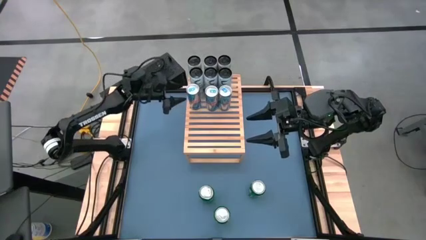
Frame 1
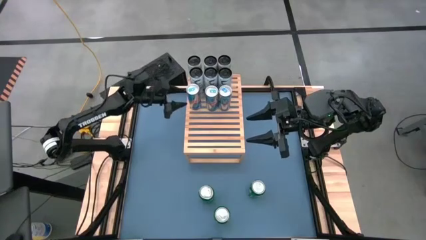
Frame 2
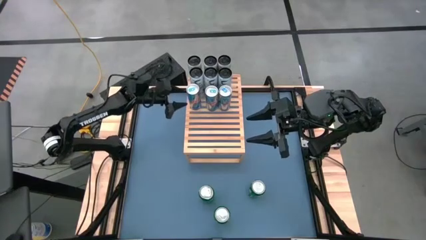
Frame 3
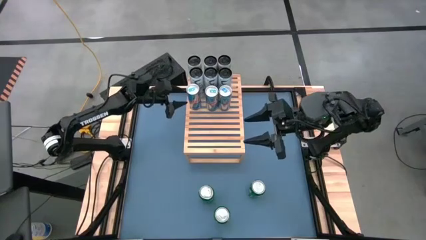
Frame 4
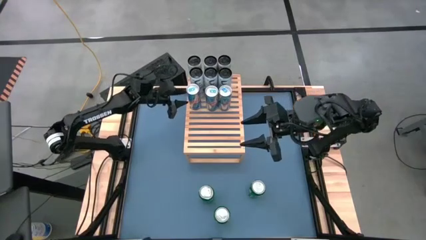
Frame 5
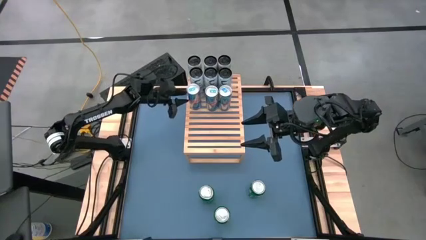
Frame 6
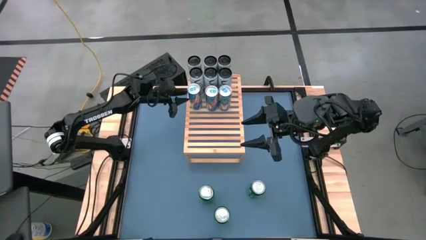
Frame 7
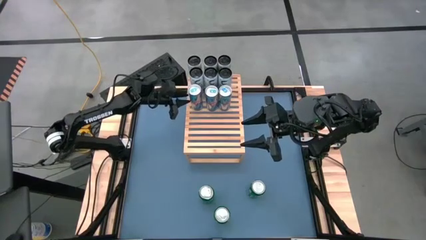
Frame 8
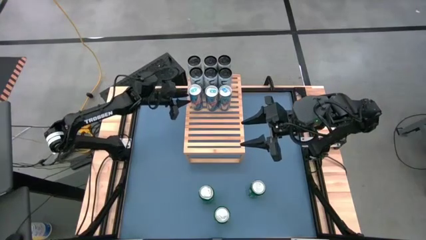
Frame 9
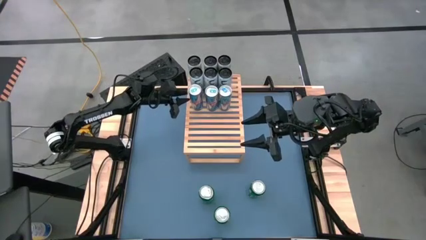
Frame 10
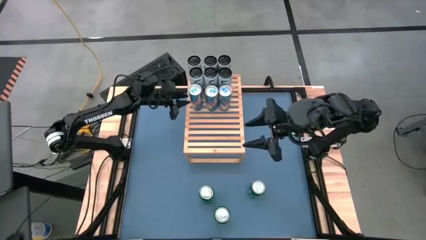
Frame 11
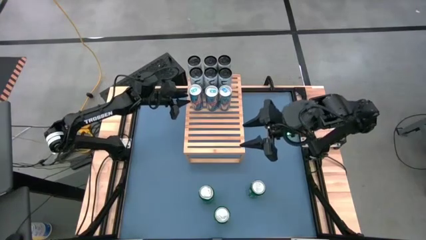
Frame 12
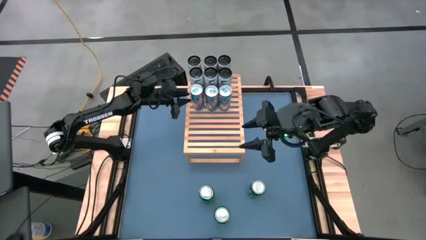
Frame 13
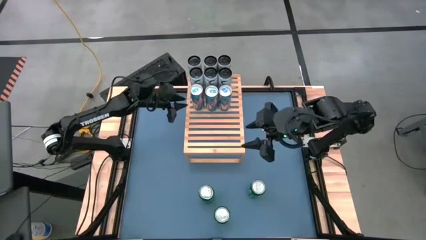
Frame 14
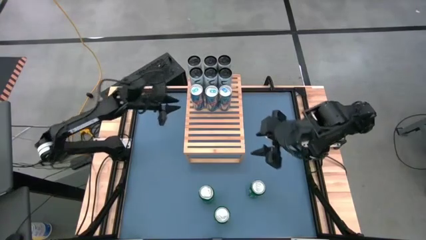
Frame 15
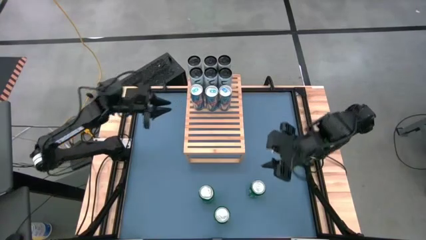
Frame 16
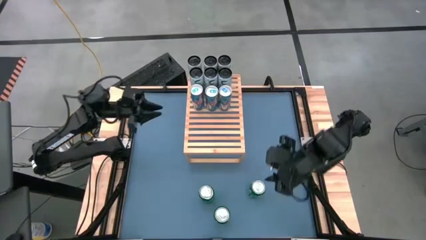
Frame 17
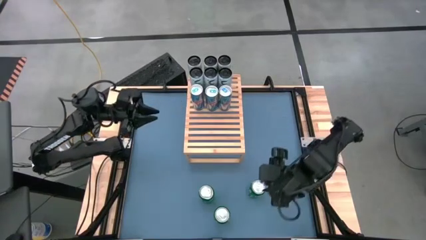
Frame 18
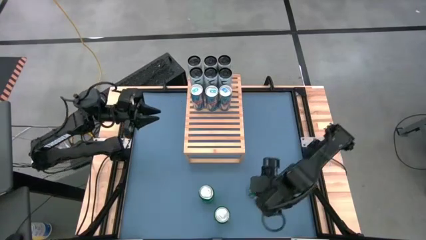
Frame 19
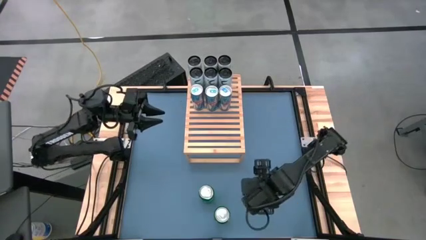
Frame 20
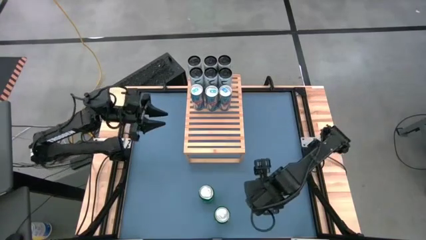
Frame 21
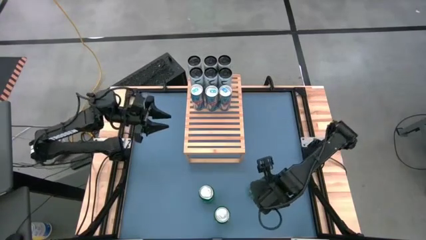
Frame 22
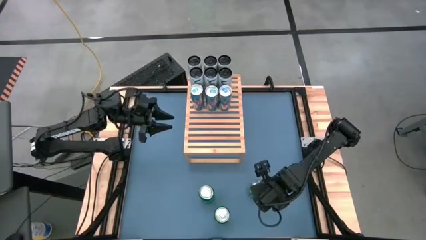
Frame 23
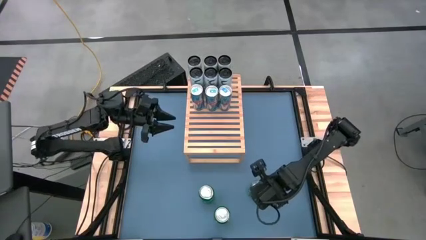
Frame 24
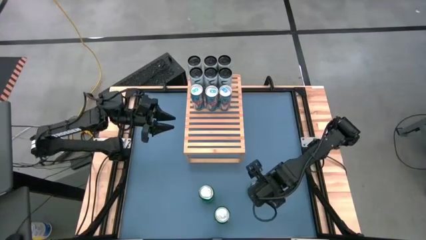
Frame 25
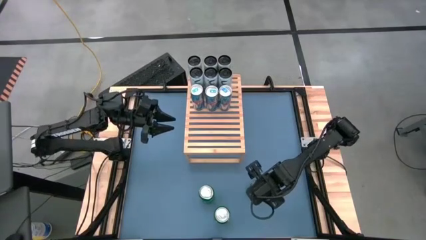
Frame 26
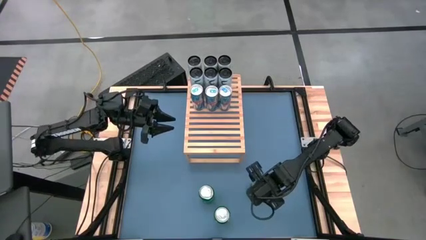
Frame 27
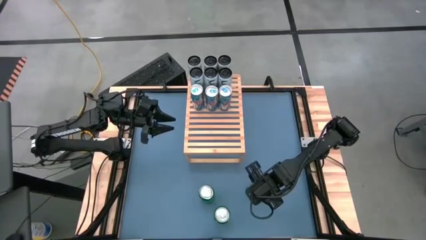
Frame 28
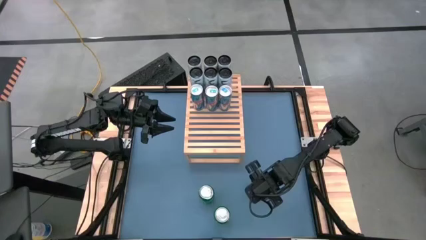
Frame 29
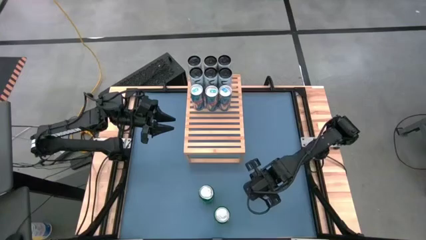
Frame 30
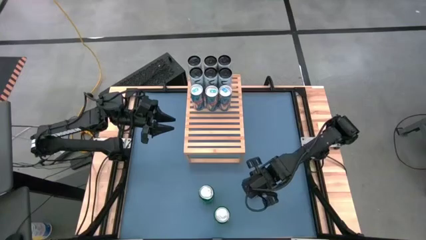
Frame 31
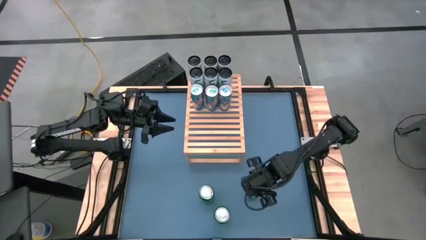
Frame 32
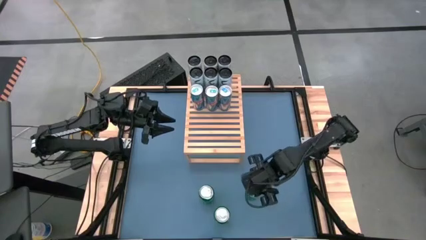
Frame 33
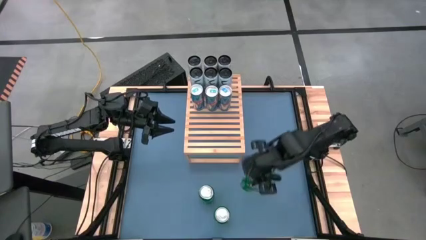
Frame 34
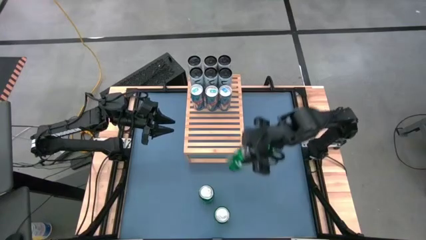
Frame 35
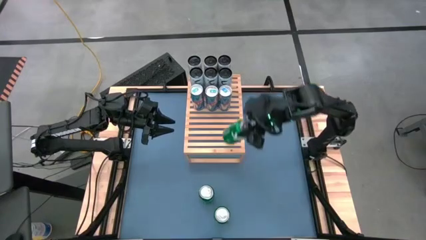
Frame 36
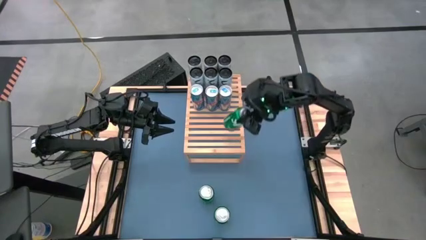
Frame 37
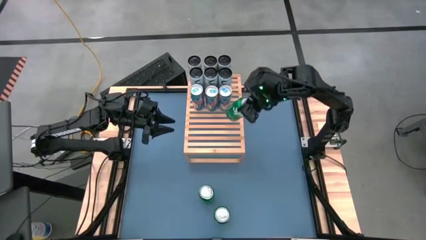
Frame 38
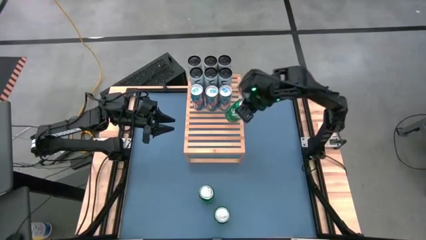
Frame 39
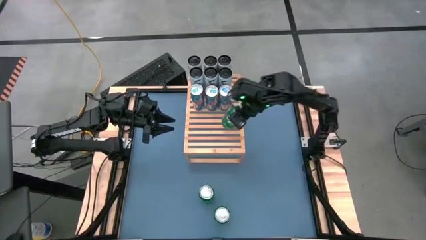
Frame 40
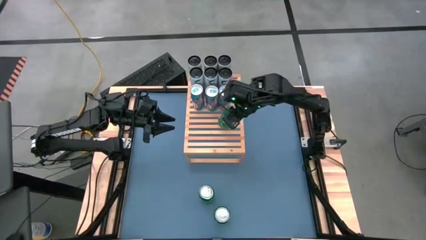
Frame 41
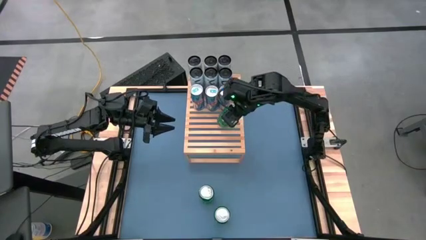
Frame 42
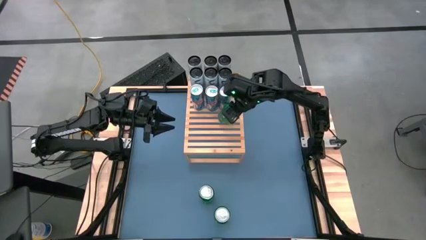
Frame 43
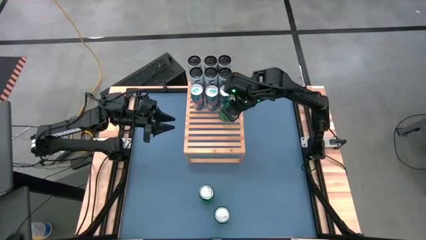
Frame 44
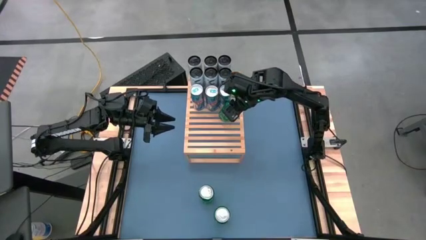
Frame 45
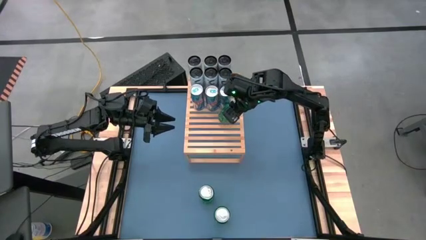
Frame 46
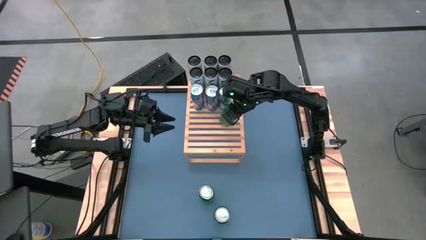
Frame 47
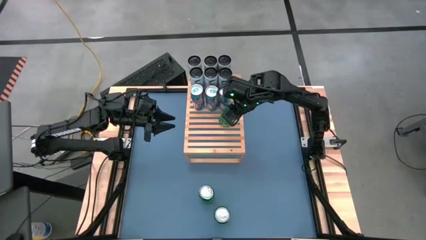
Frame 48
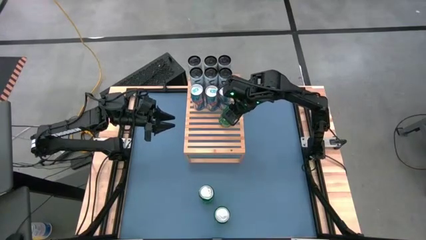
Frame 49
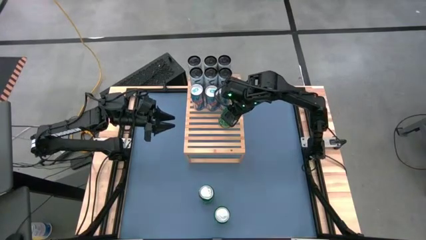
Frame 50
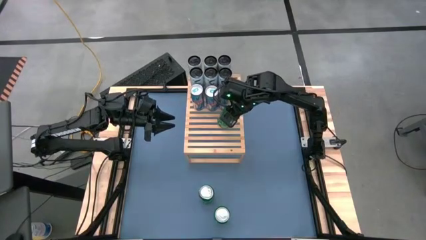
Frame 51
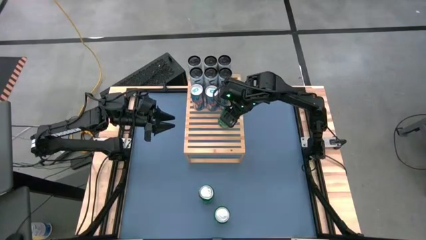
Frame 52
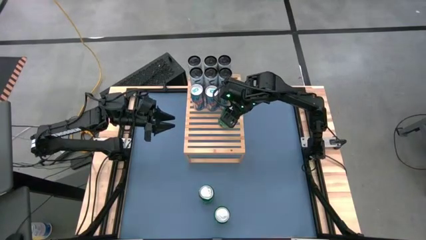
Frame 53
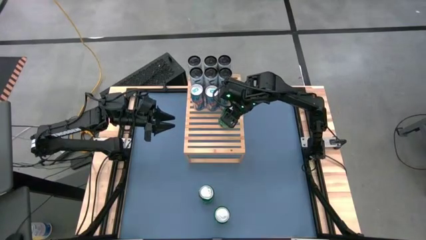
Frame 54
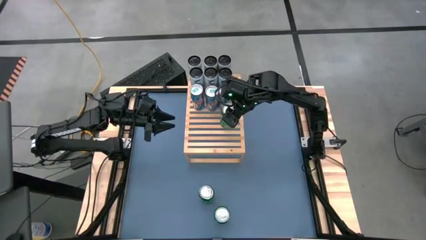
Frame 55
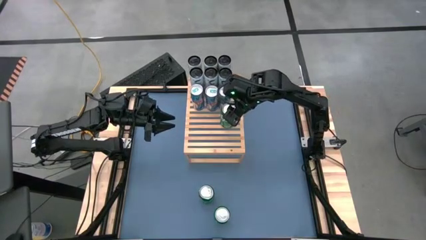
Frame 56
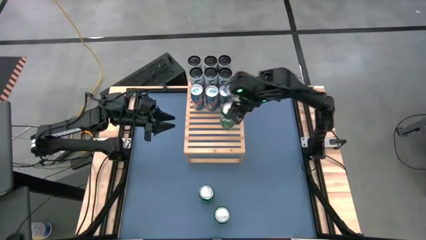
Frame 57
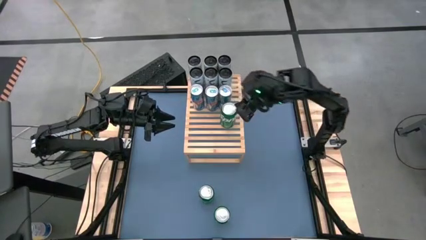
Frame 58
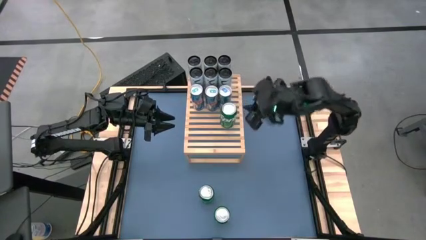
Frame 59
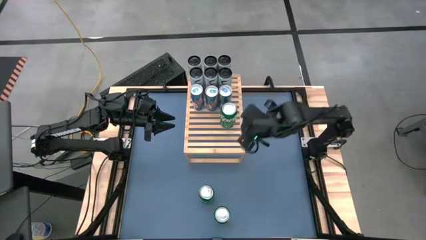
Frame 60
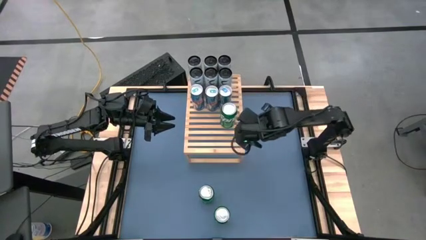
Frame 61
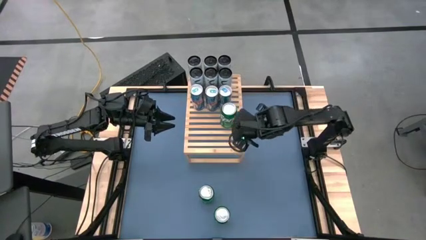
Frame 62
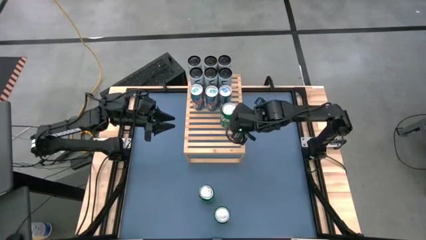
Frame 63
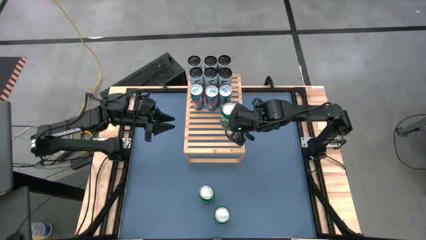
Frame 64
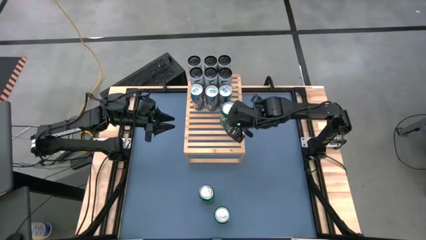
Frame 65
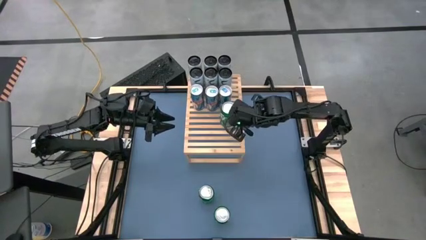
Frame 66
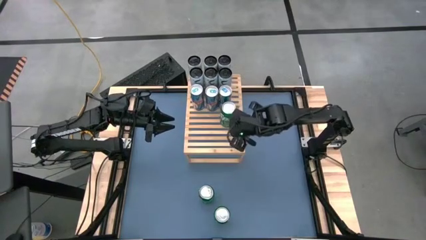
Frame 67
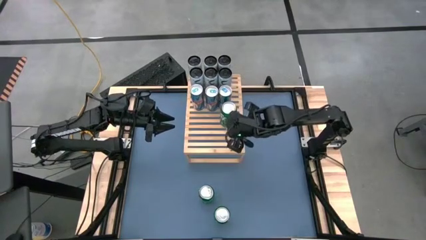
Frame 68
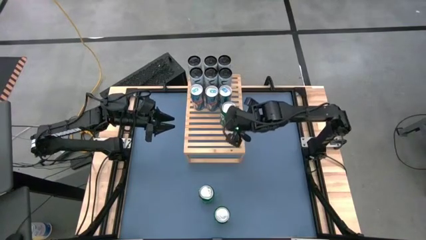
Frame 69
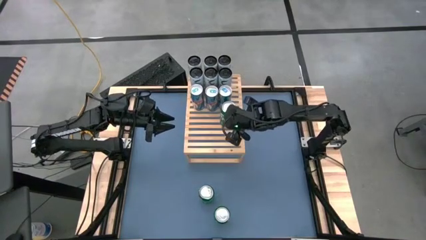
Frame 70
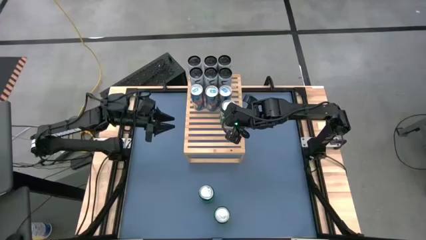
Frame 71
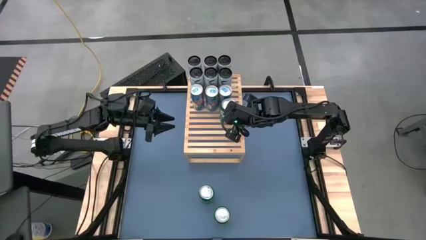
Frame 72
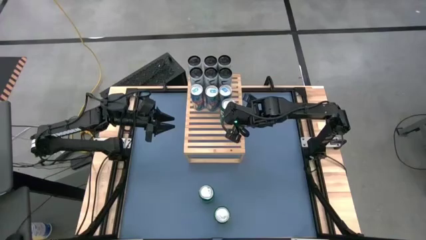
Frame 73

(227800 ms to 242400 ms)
Task: Place canned beverage on shelf
Put the green soda can on the shelf
